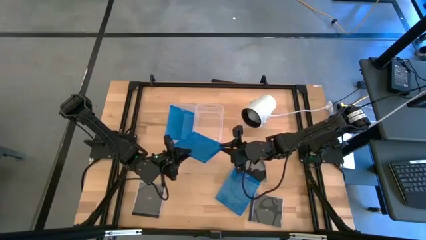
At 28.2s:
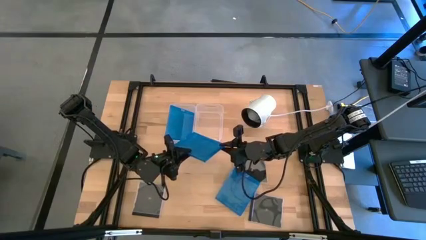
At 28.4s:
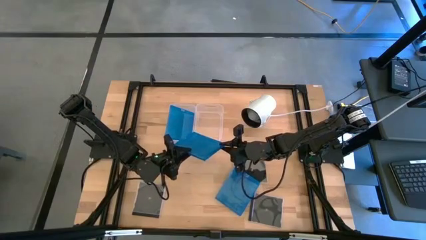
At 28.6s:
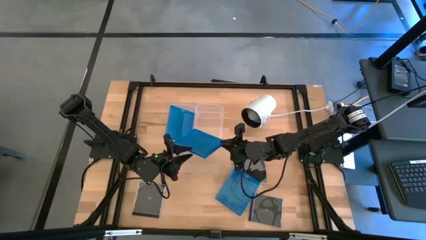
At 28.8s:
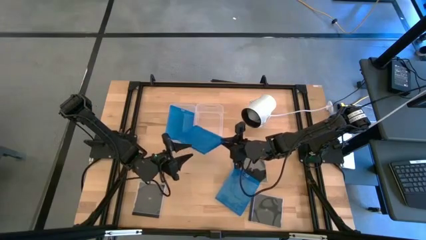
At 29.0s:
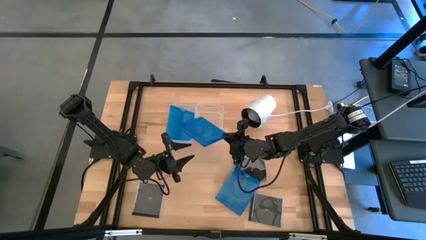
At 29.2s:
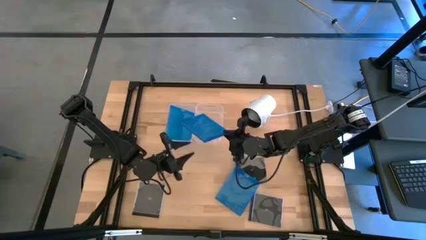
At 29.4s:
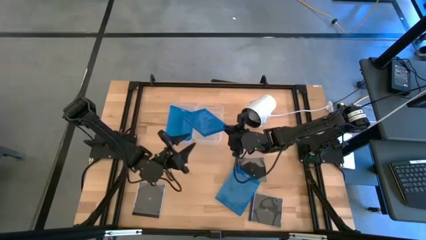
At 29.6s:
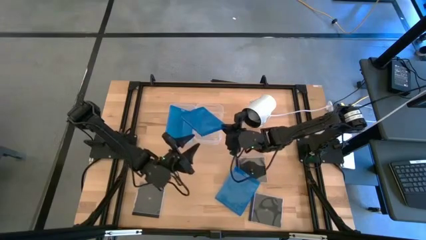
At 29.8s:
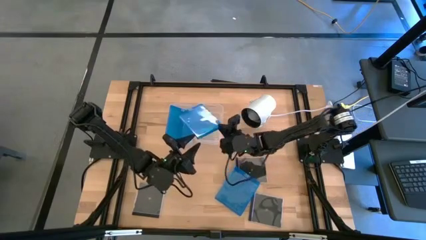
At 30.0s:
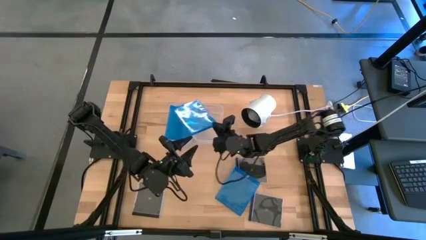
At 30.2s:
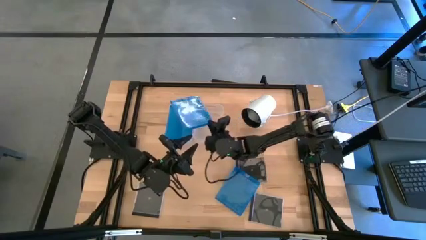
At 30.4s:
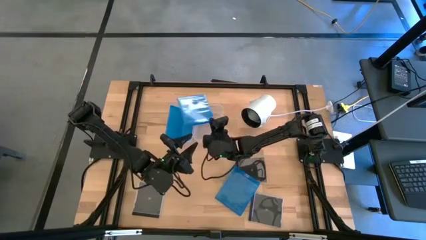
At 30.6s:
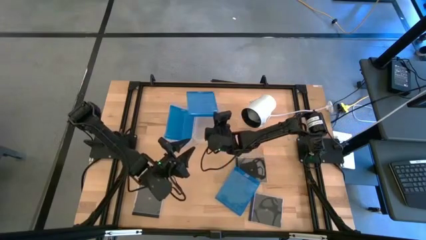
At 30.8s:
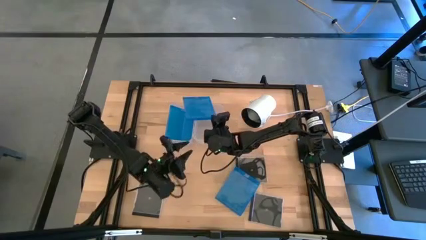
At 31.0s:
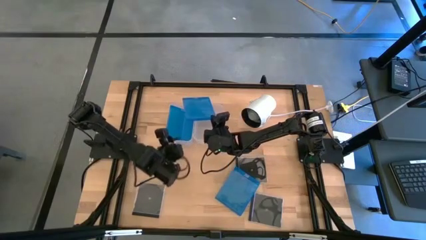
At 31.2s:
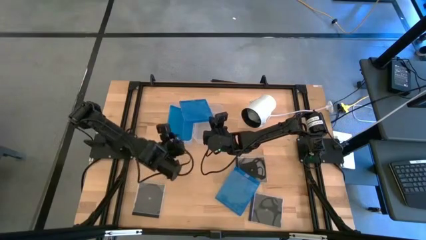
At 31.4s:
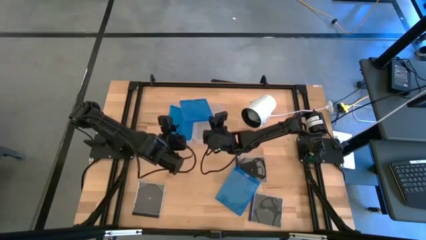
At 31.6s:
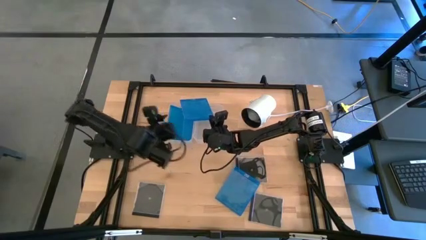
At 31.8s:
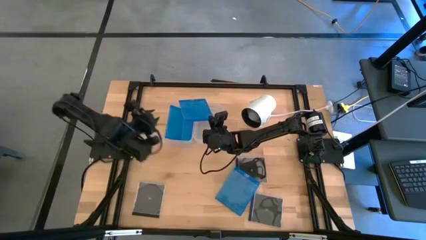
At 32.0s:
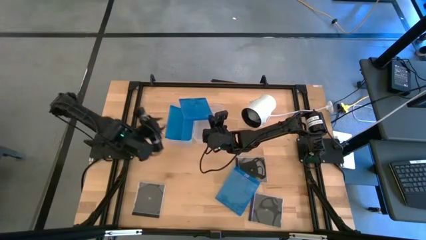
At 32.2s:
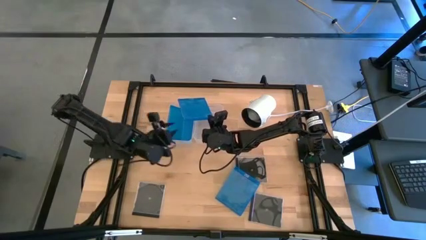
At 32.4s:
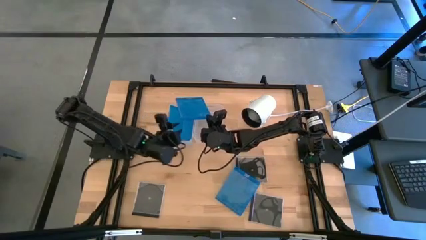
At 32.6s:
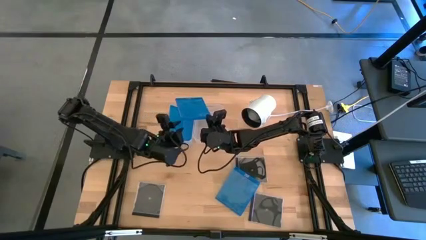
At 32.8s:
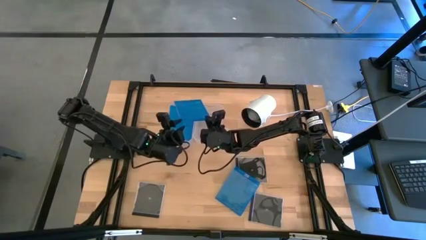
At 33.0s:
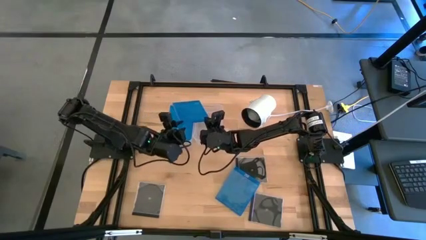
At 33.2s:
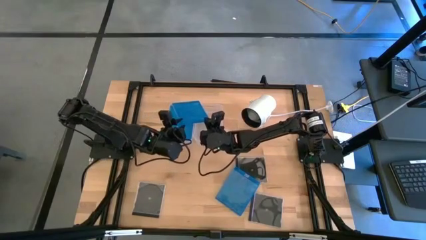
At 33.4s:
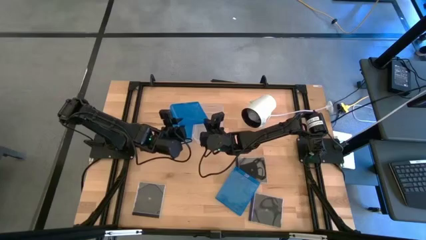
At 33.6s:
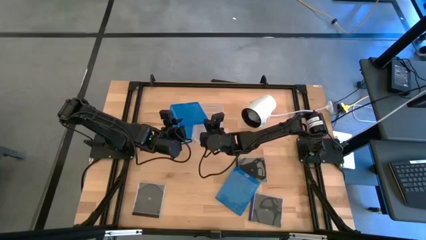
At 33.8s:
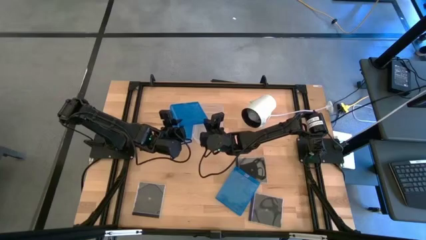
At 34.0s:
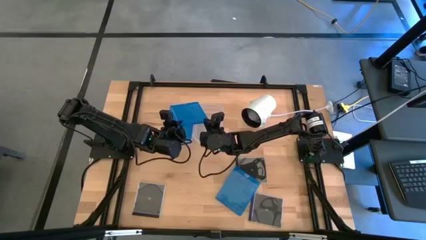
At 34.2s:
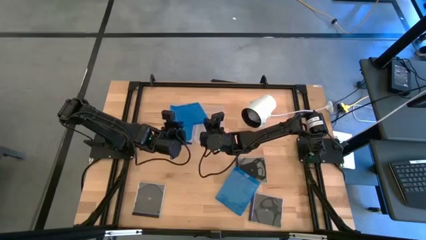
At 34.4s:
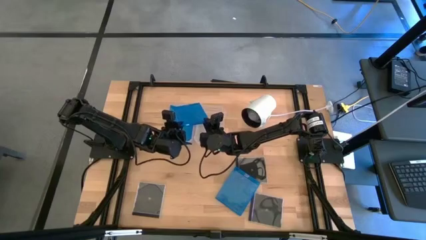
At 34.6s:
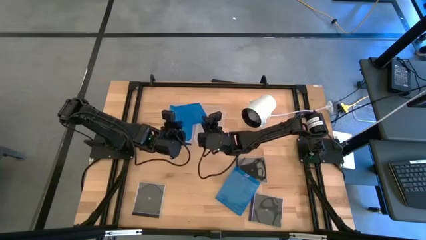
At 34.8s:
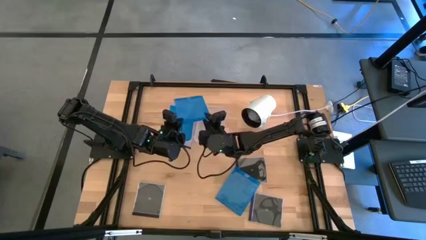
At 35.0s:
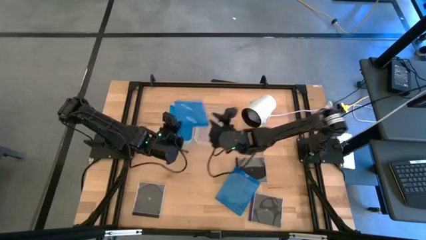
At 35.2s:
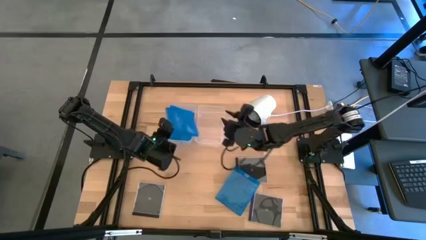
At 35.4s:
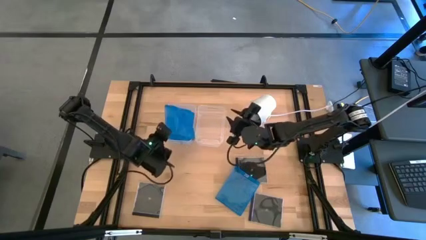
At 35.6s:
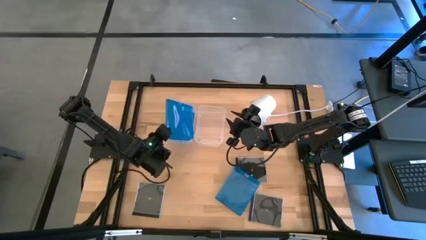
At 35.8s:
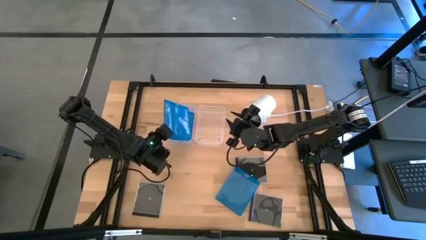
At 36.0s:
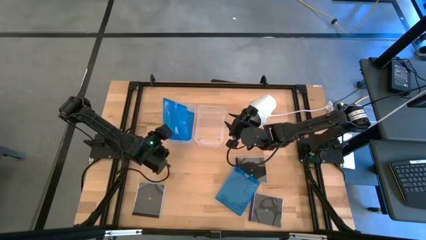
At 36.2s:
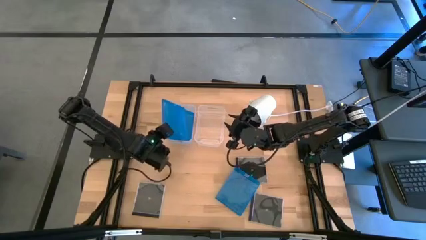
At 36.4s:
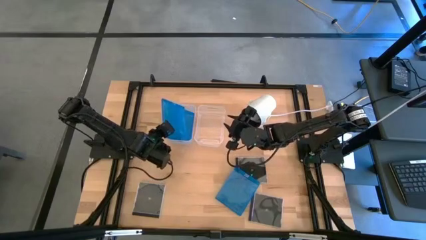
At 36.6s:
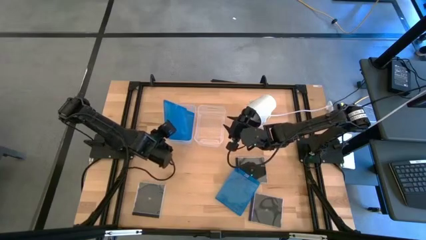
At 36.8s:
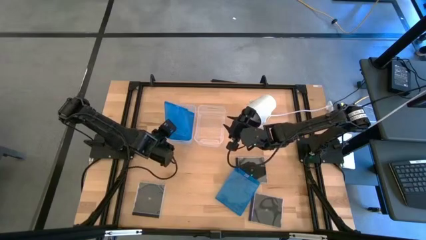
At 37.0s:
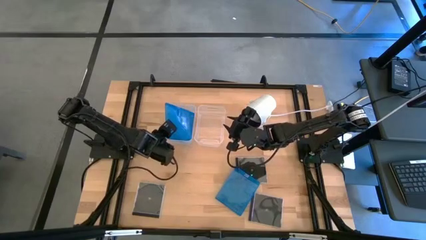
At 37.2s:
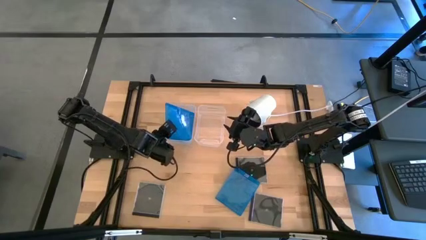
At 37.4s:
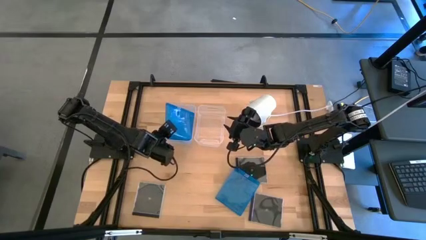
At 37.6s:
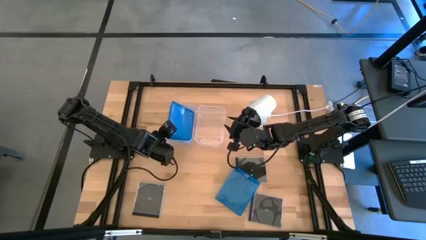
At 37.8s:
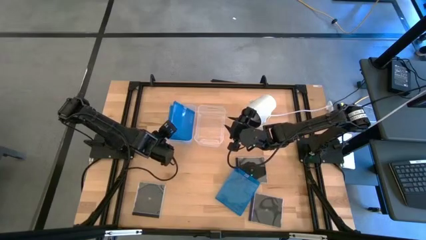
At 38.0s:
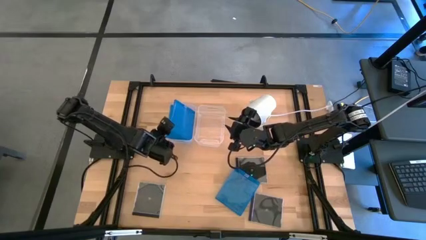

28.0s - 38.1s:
Task: Pick & place jewel cases by type
Put the left blue cd case into the left transparent bin

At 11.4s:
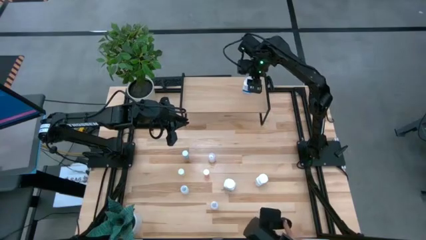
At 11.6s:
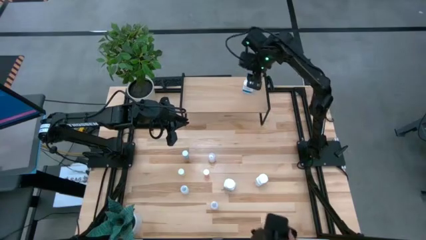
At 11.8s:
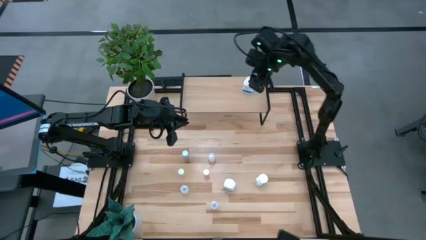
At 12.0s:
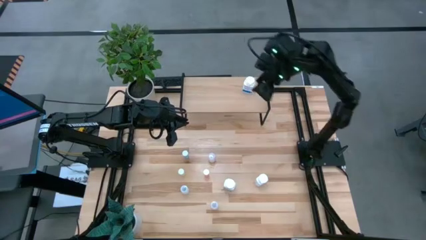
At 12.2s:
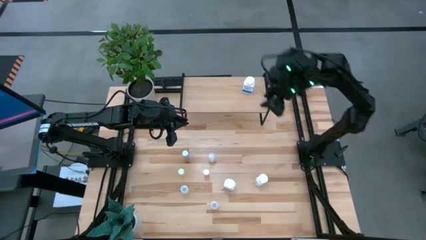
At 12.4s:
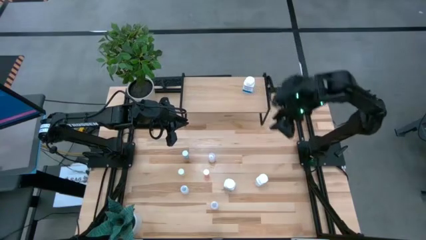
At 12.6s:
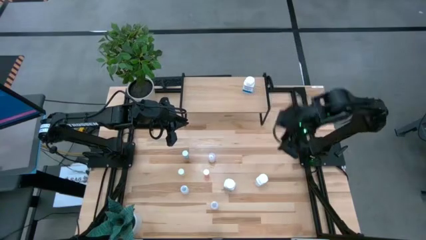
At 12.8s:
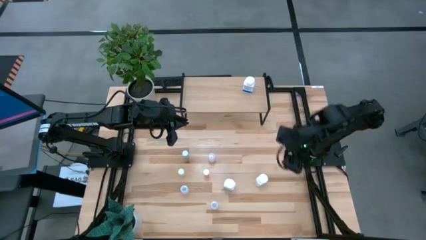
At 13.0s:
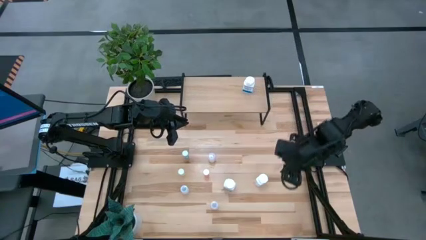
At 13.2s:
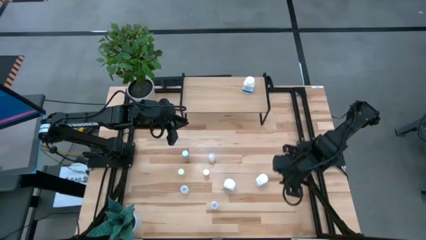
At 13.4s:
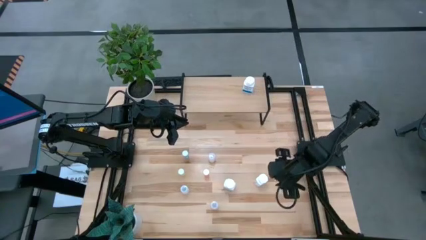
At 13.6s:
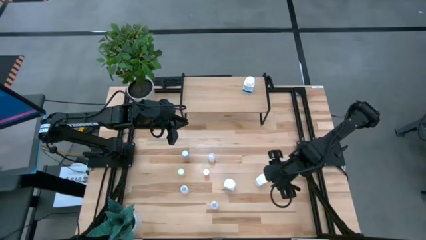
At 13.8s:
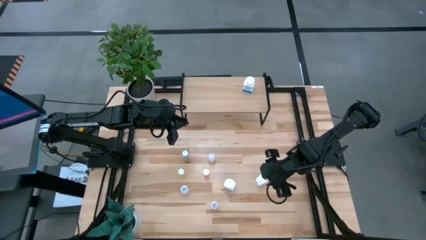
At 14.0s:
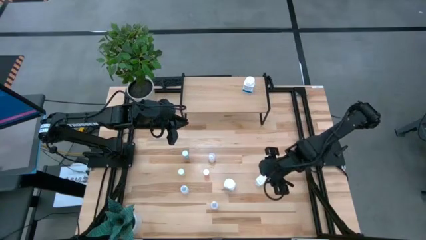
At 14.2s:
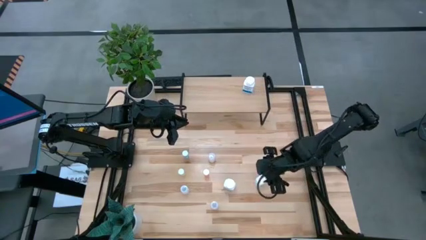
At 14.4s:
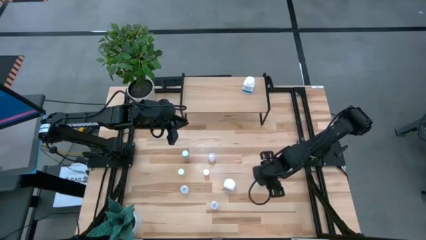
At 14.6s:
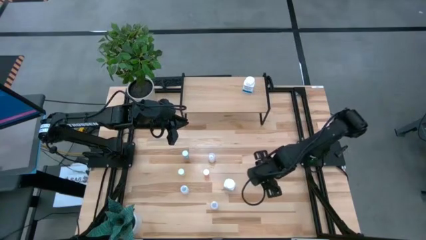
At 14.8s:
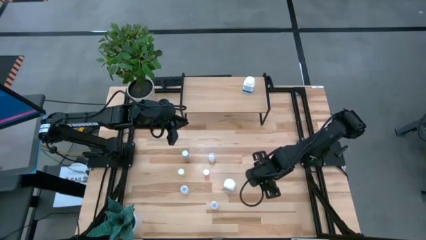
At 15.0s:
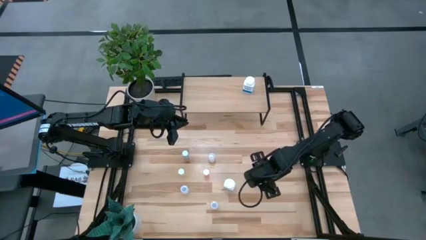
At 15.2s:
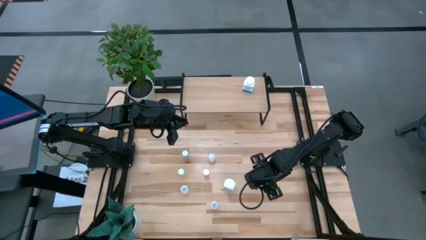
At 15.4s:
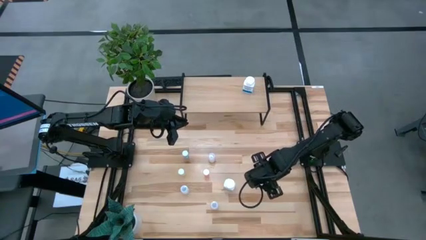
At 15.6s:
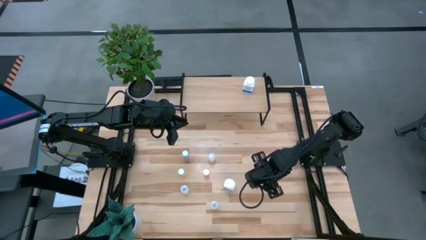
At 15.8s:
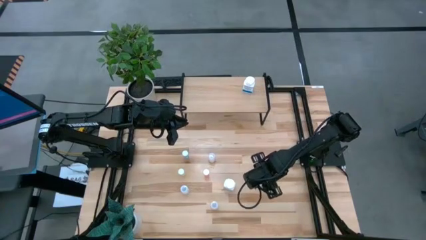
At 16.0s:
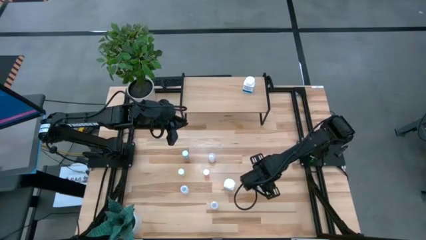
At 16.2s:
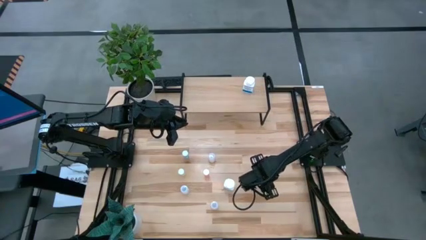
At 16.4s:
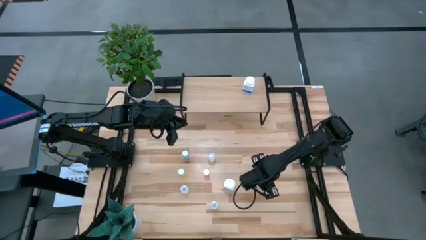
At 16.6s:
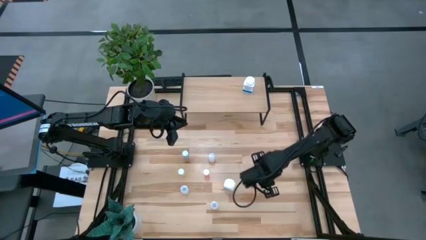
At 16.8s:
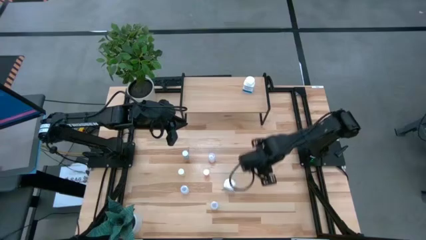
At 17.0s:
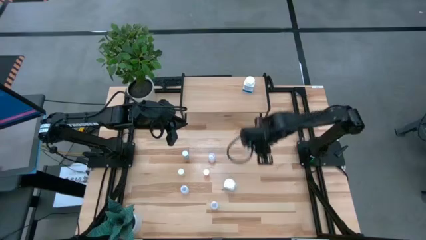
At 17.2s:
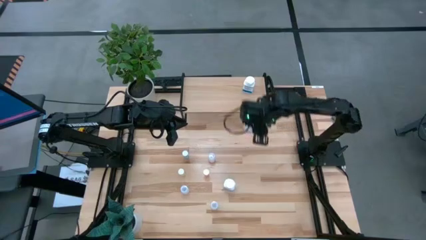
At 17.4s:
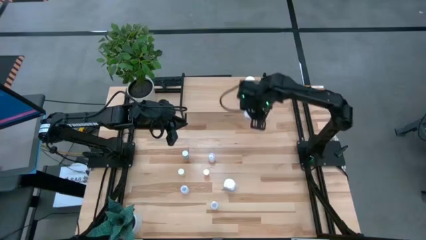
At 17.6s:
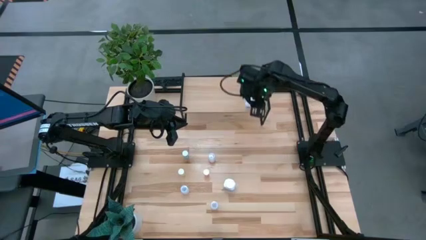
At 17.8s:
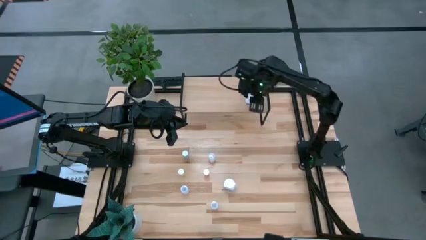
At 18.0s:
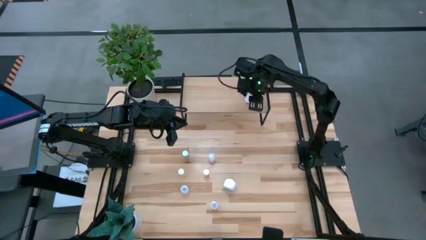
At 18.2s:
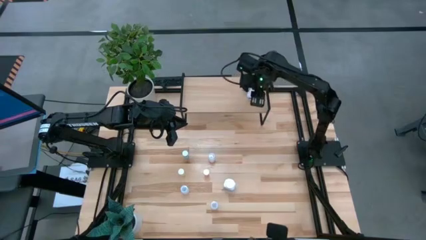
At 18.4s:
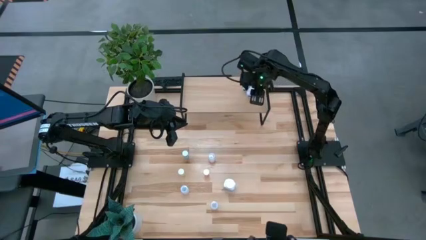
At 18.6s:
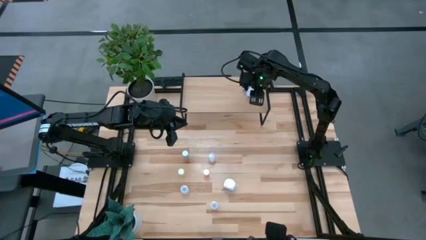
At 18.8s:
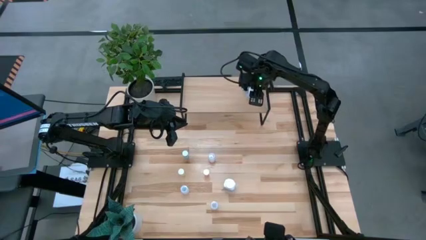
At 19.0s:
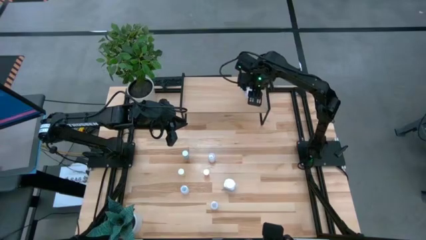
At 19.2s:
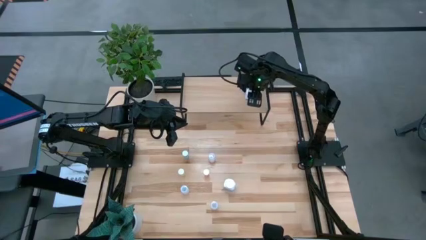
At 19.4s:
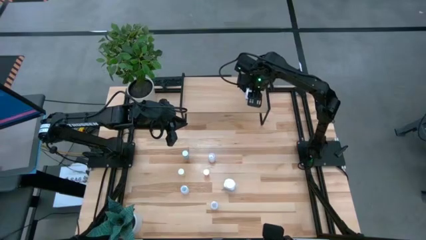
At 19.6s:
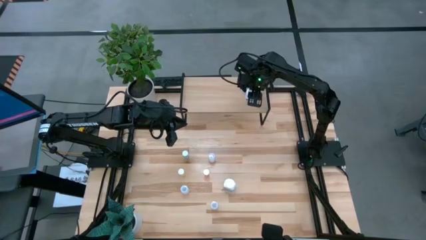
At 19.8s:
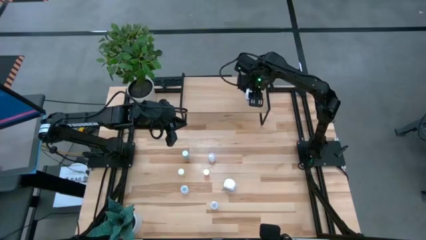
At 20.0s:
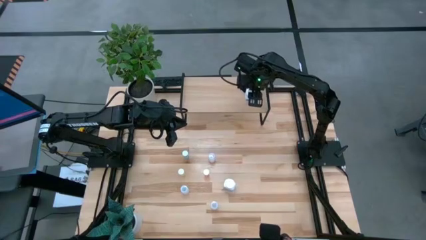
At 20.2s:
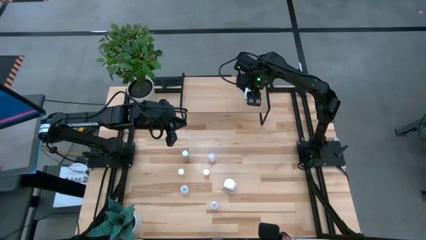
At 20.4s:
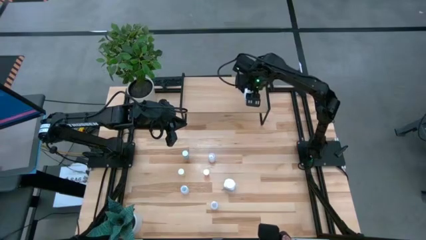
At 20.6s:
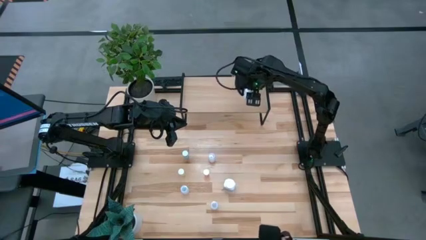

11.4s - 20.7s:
Task: Pick and place medicine bottles onto shelf by color
Put the right white, blue pill bottle on the shelf aligned with the other white, blue pill bottle
